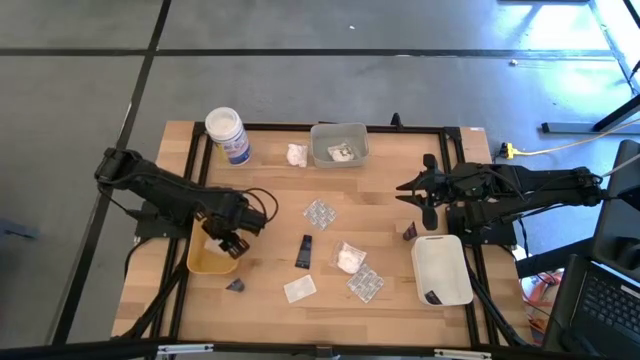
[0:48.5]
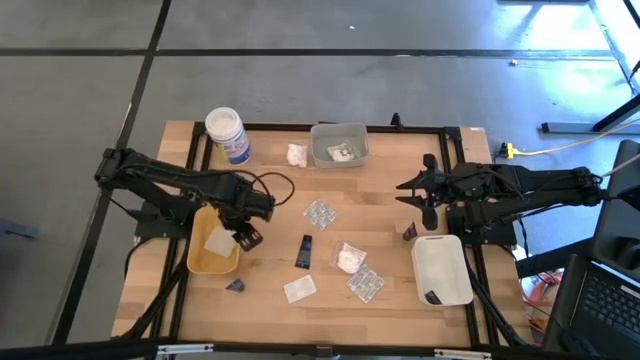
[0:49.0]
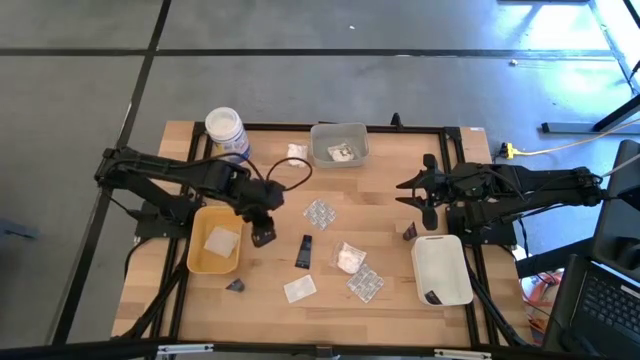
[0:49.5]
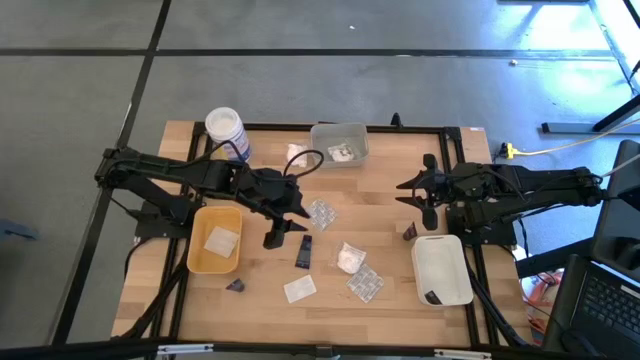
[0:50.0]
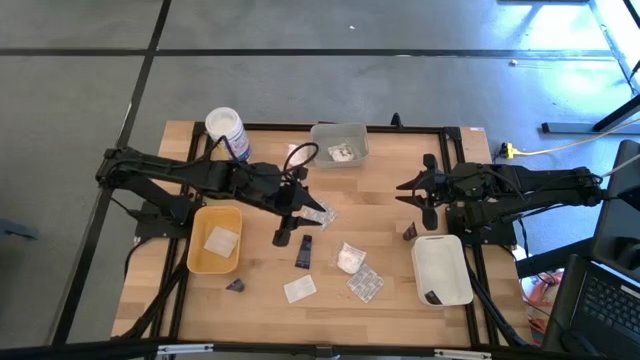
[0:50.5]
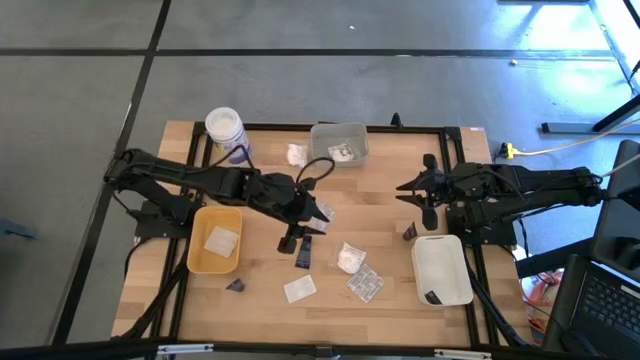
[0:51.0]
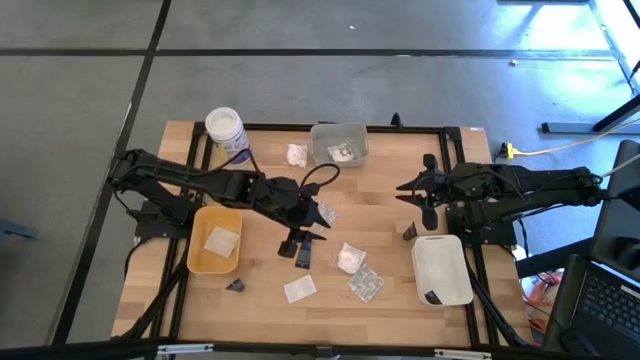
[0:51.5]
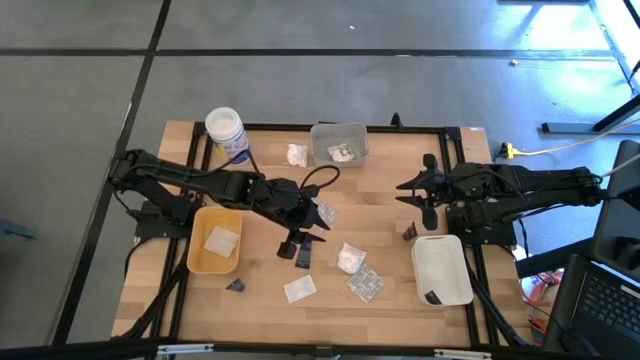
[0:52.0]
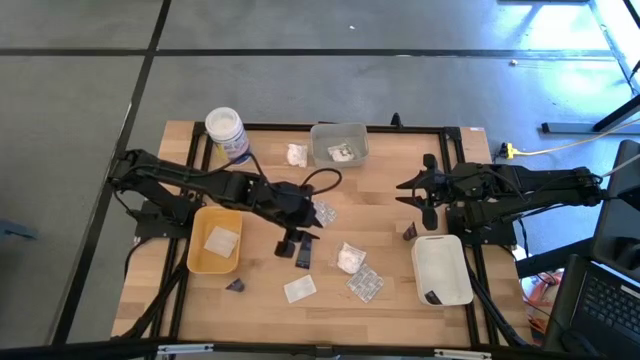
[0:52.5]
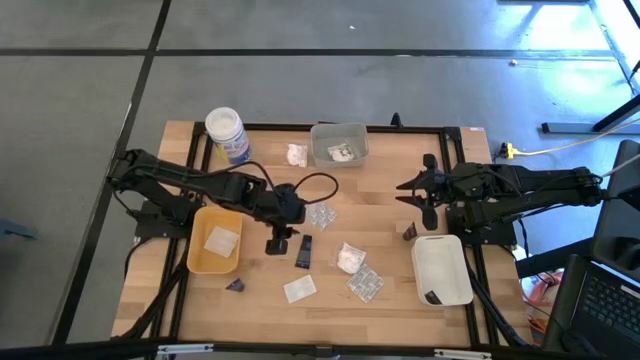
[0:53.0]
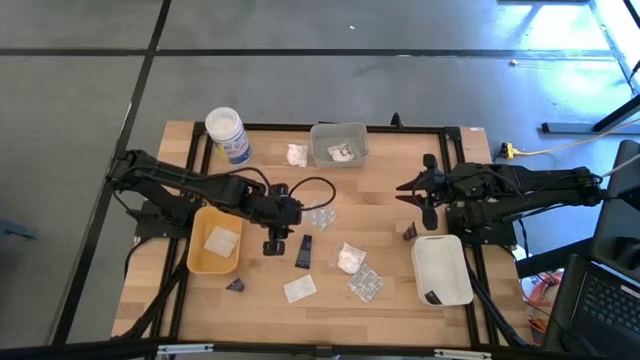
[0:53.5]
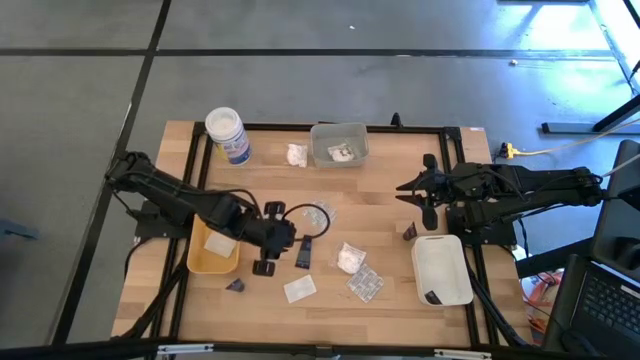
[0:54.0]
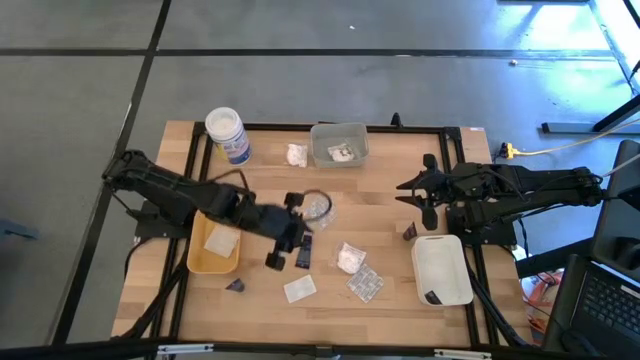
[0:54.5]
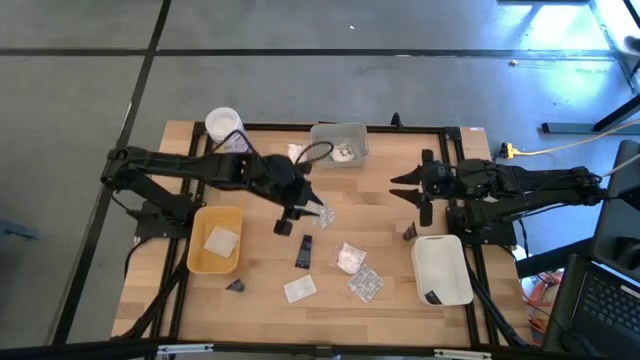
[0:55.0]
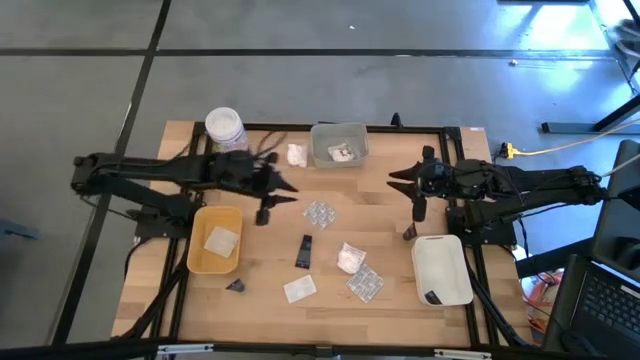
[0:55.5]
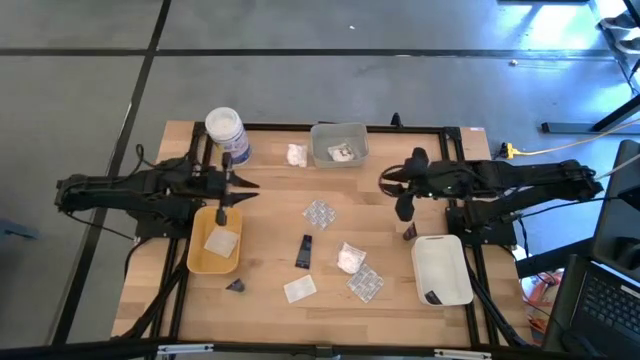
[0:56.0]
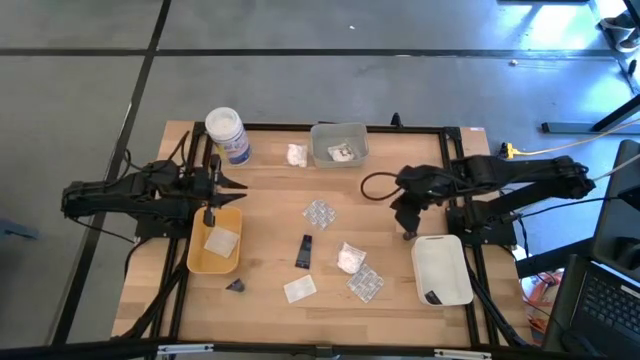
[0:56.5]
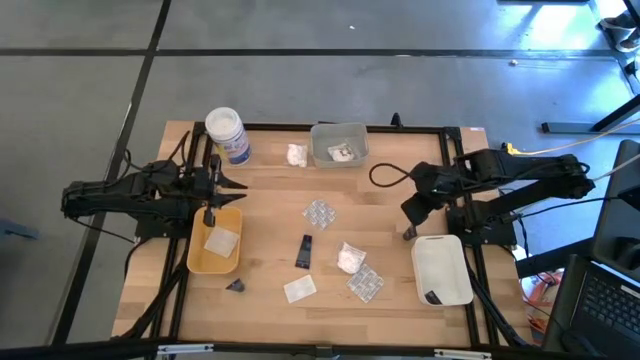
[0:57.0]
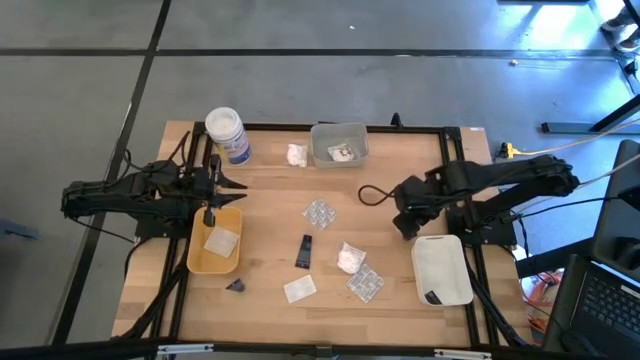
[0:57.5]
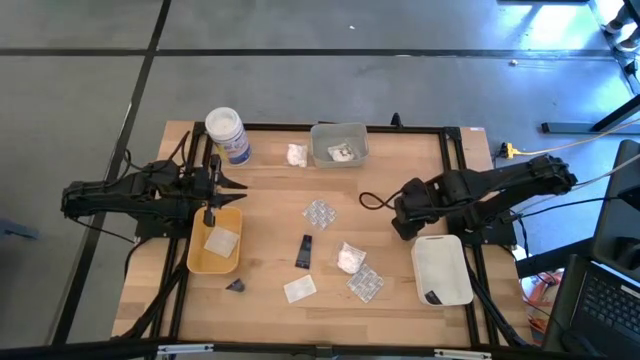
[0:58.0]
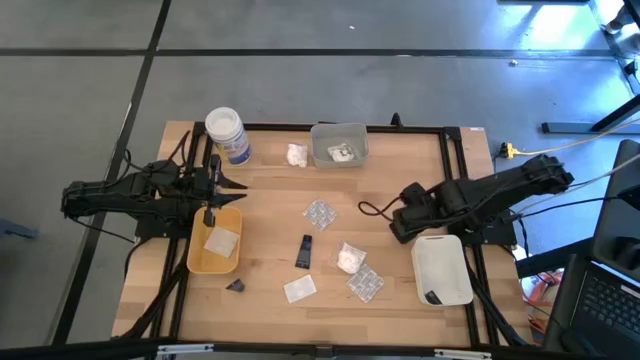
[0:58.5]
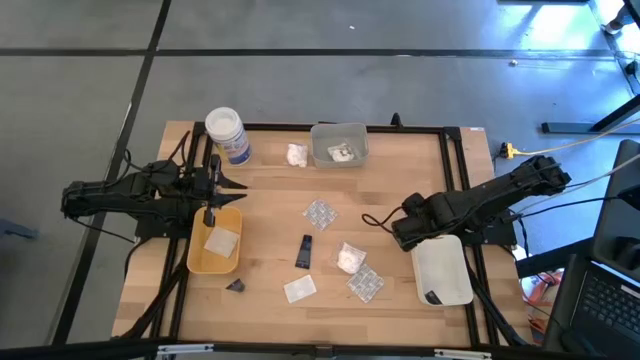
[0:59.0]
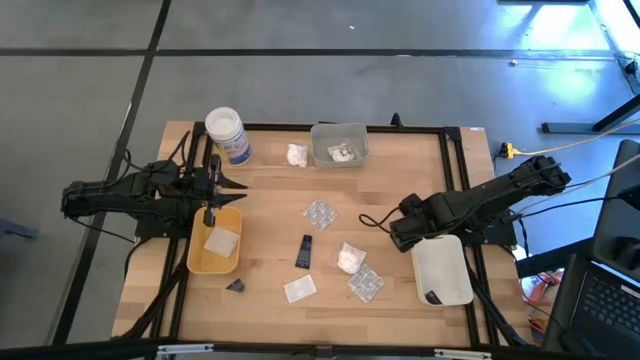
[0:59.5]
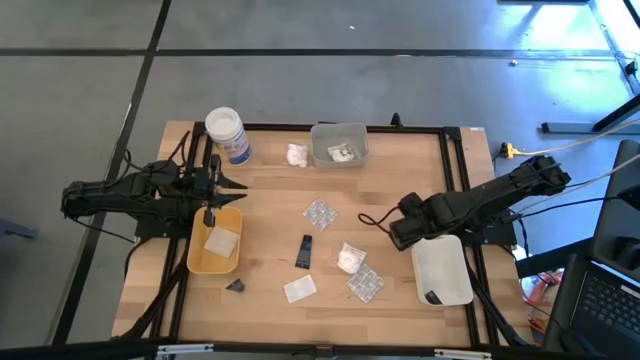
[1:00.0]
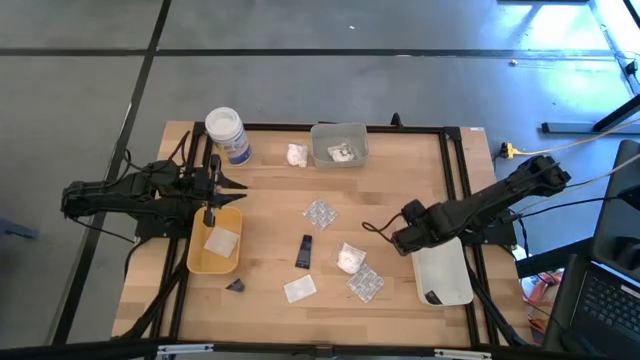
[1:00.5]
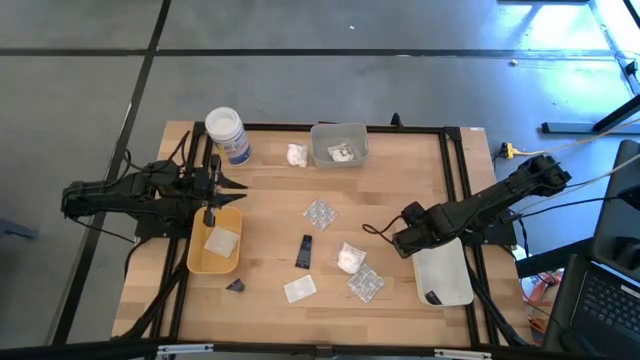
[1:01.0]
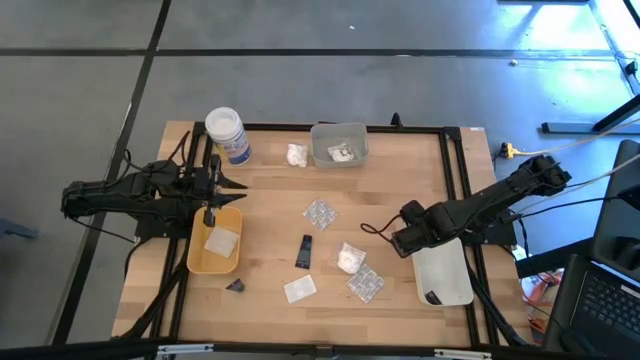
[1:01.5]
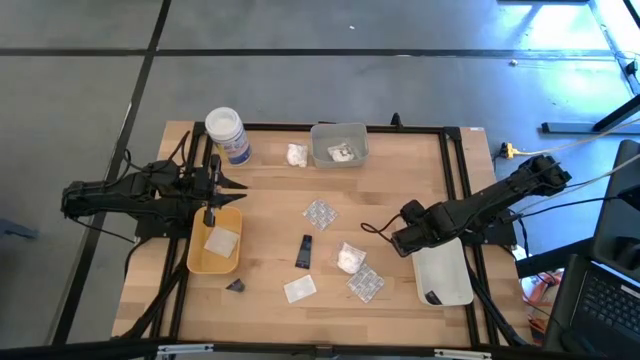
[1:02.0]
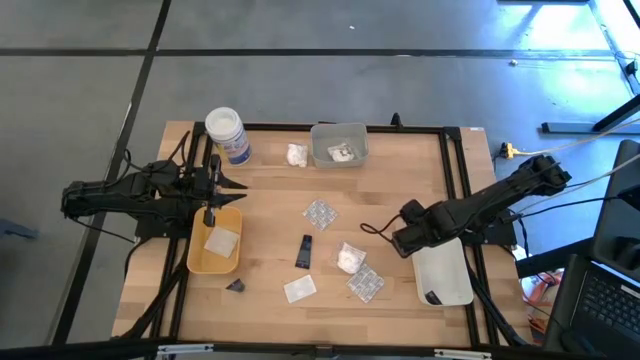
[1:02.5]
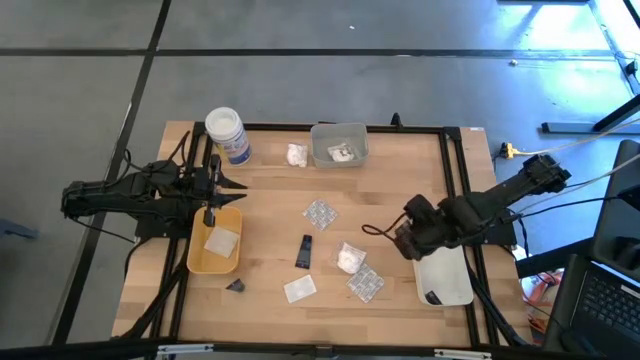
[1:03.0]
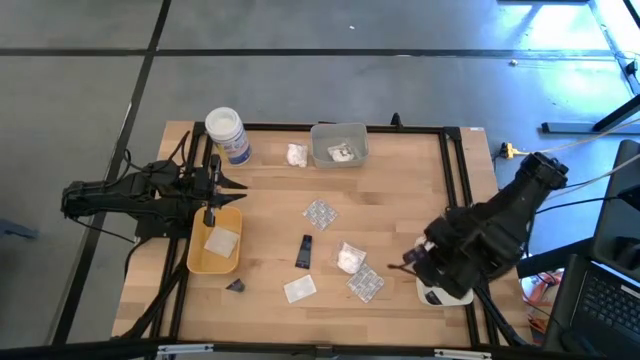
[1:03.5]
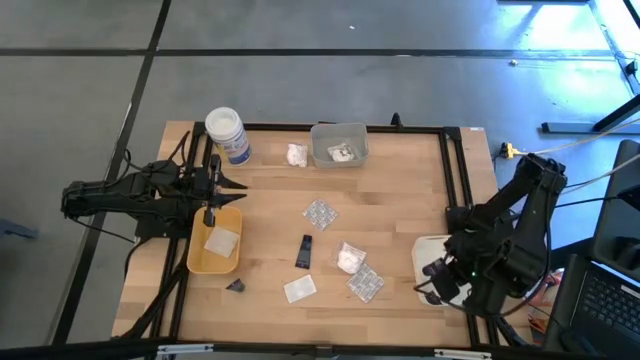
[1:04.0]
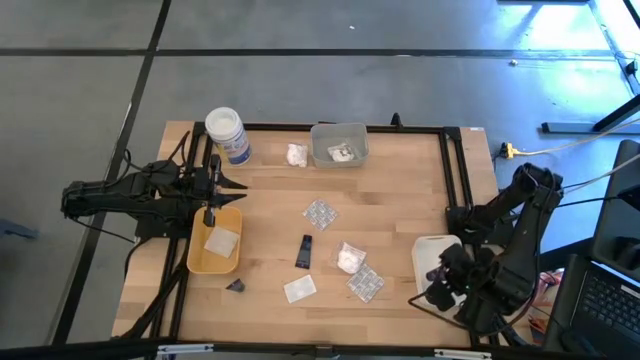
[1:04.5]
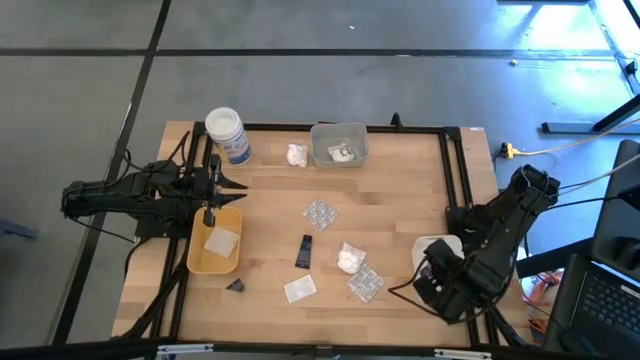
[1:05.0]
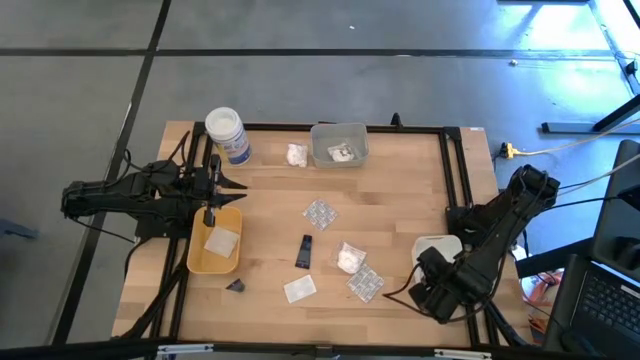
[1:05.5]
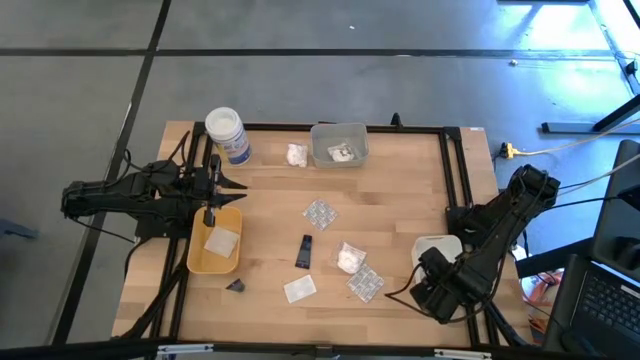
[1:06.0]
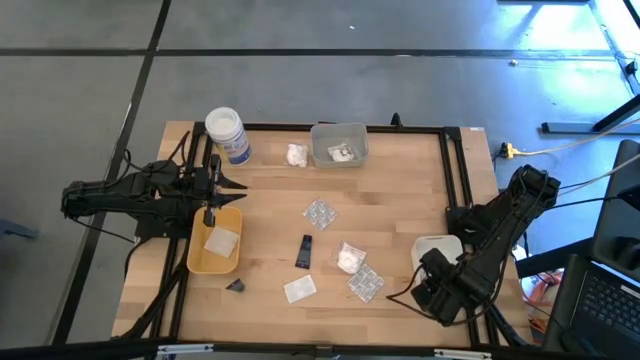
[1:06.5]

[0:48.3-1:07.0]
Task: Pick & Place Travel size toiletries
Put the blue shaving cream into the white bin

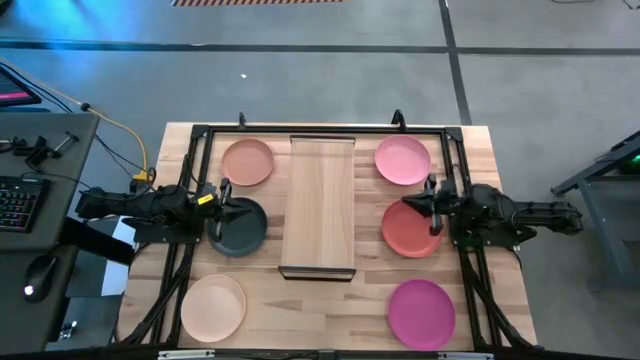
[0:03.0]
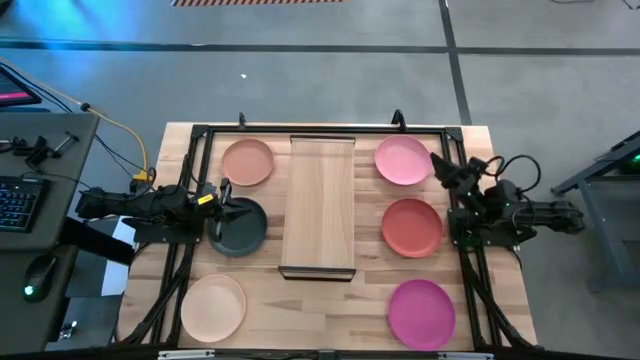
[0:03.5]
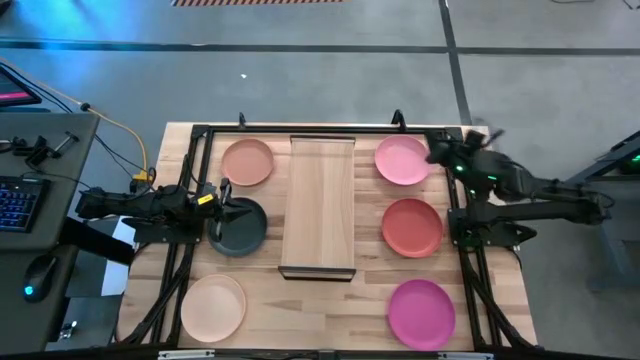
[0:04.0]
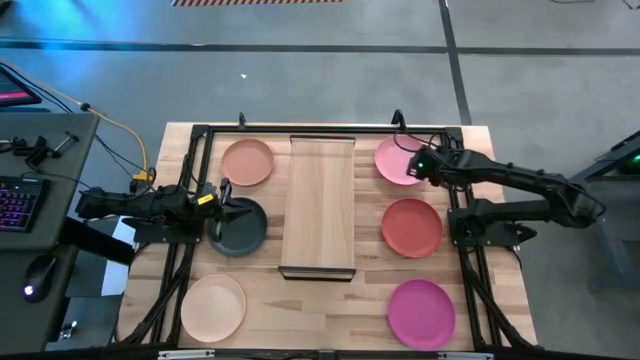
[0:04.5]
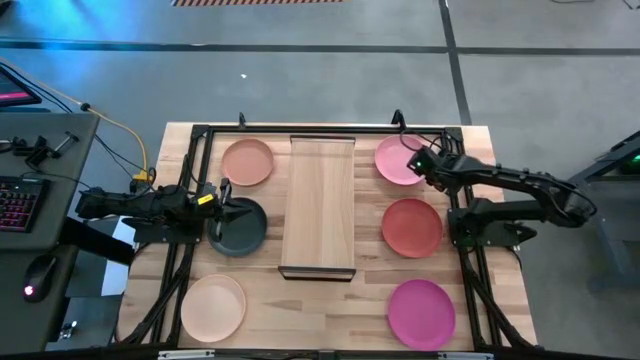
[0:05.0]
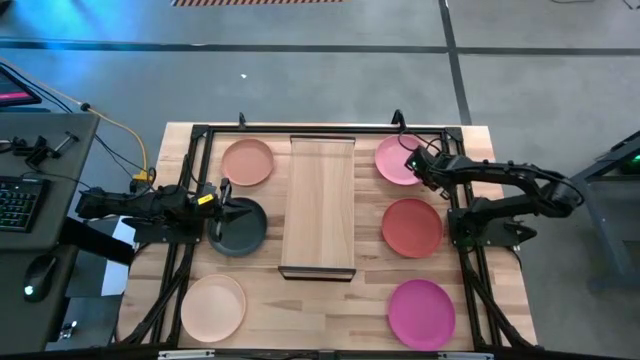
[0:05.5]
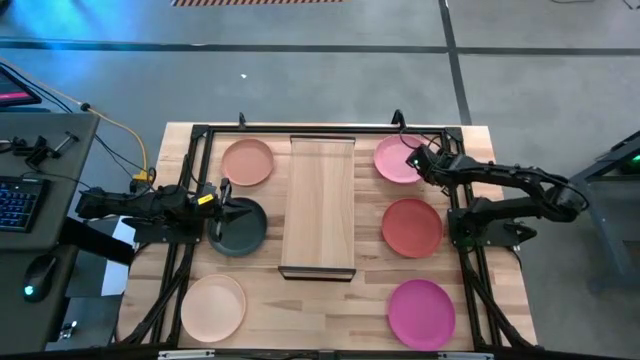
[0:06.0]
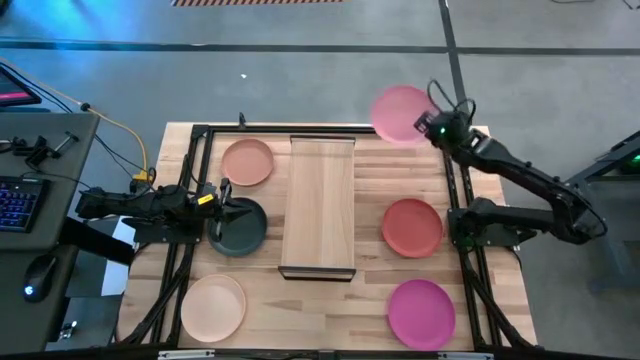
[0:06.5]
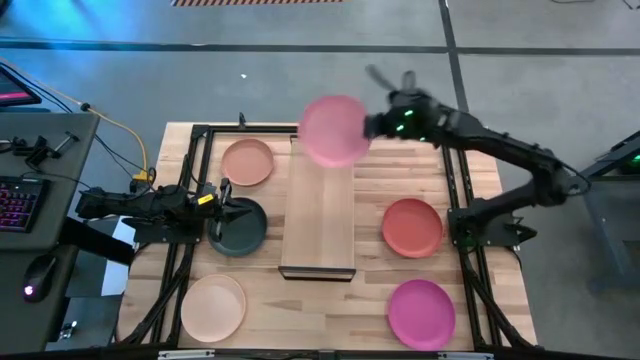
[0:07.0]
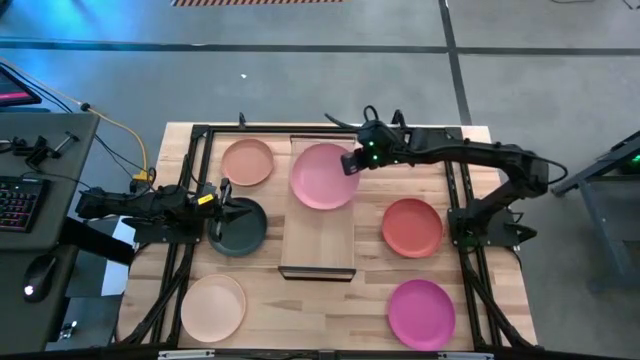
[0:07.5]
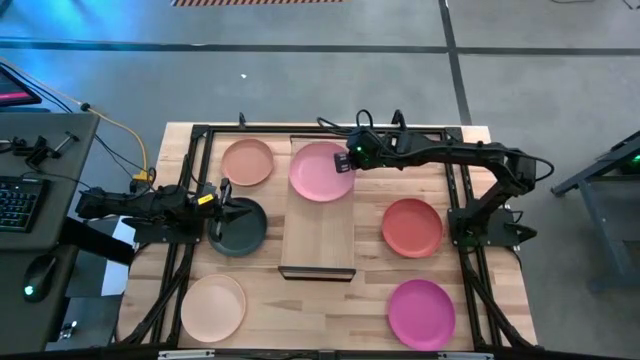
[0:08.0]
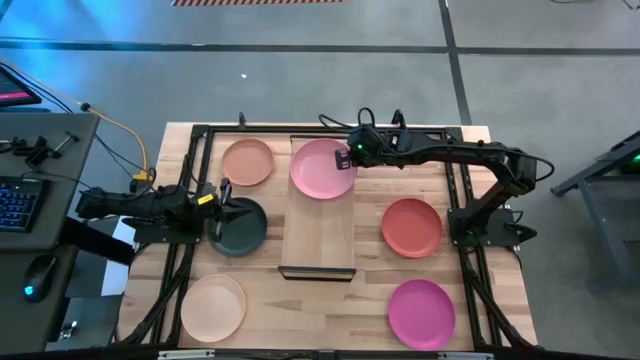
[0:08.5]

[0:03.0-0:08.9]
Task: Place and stack plates onto a shelf
Put the light pink plate on the shelf
